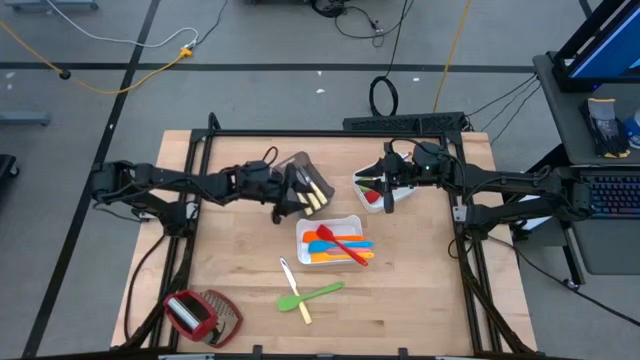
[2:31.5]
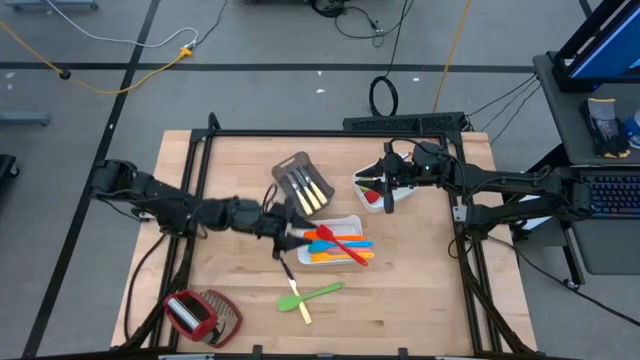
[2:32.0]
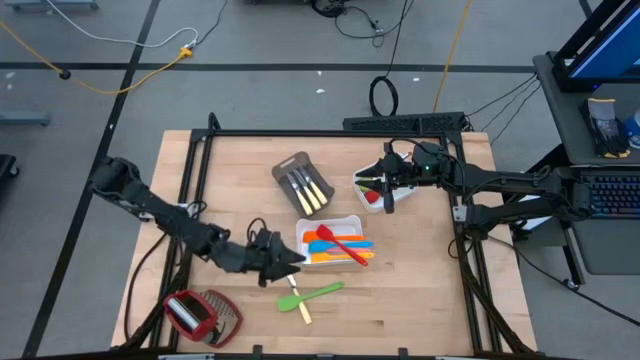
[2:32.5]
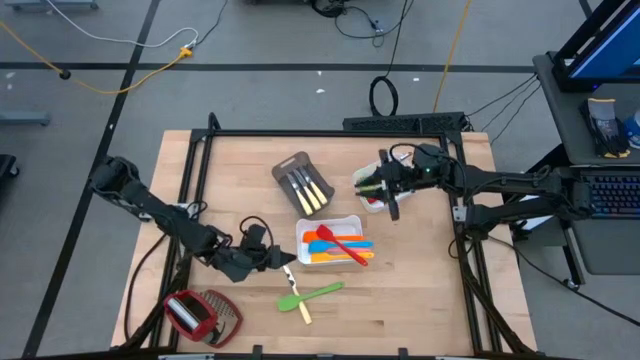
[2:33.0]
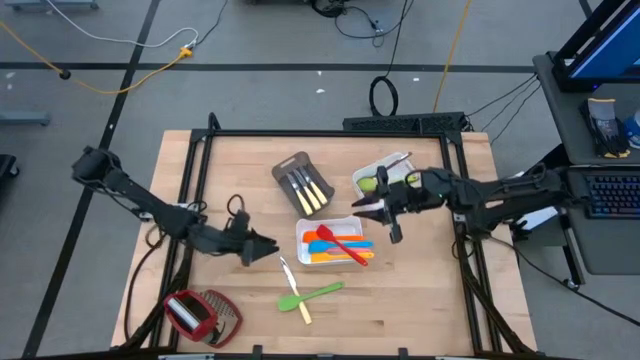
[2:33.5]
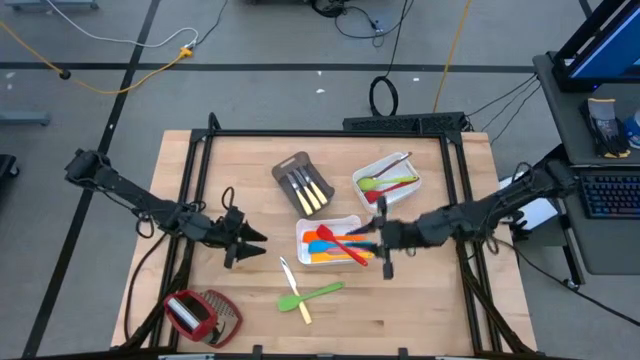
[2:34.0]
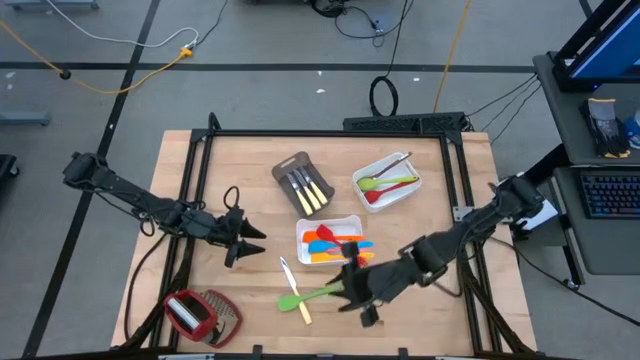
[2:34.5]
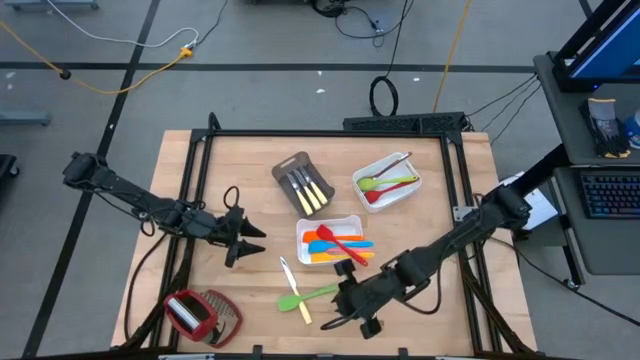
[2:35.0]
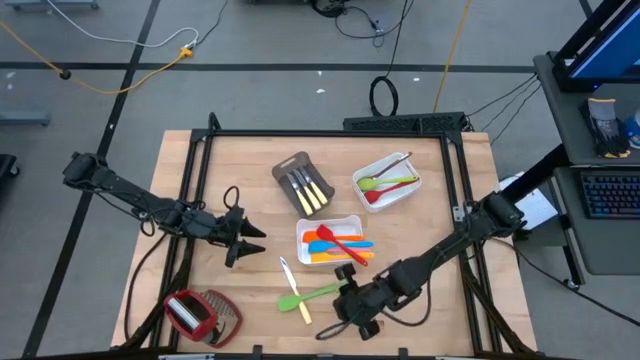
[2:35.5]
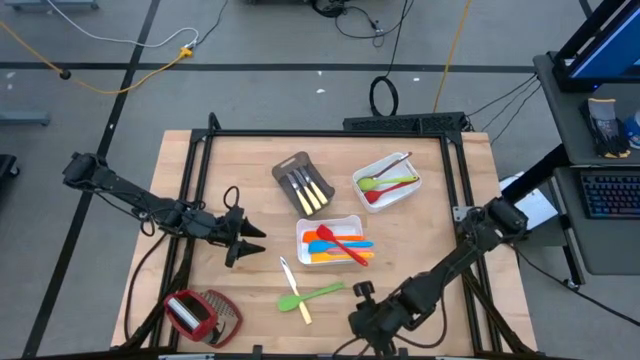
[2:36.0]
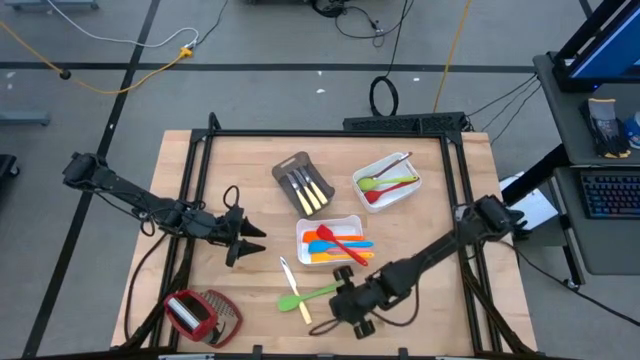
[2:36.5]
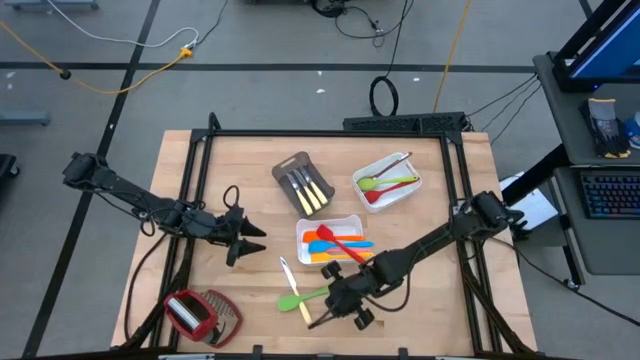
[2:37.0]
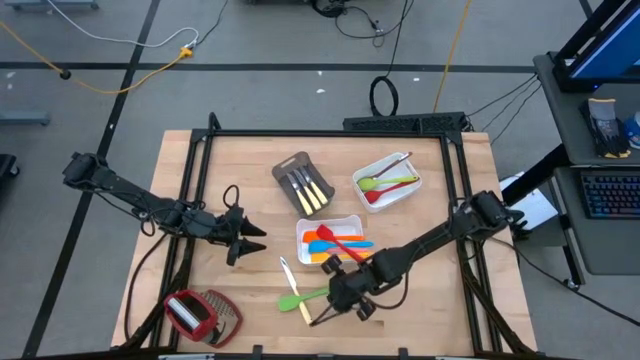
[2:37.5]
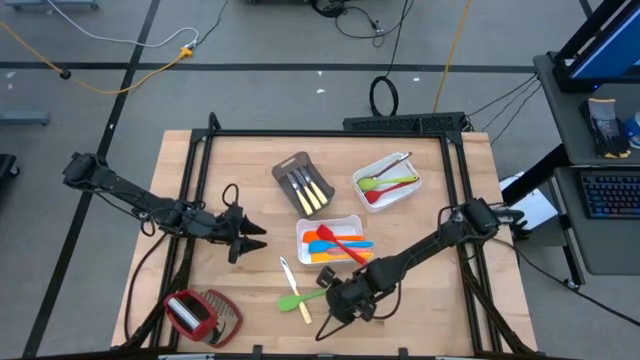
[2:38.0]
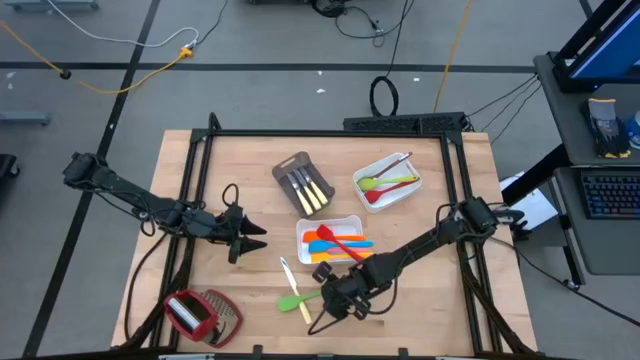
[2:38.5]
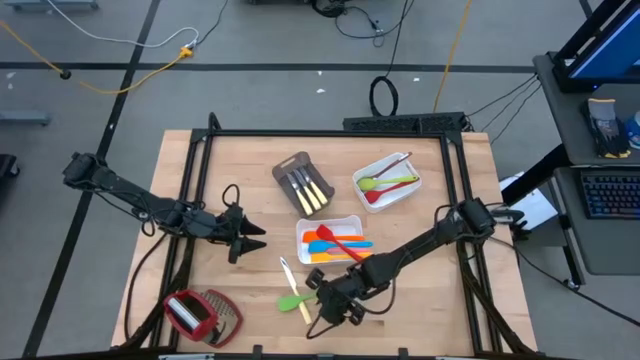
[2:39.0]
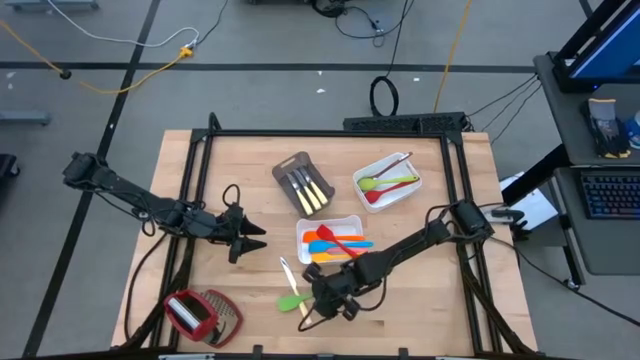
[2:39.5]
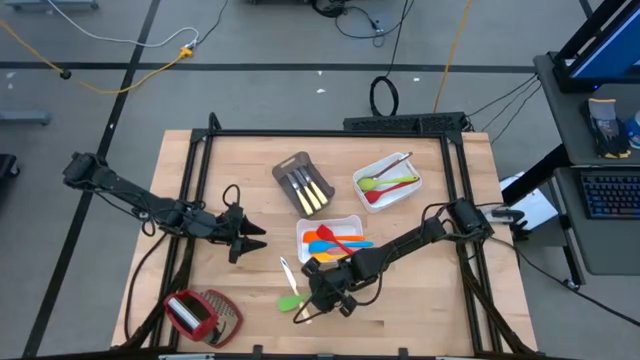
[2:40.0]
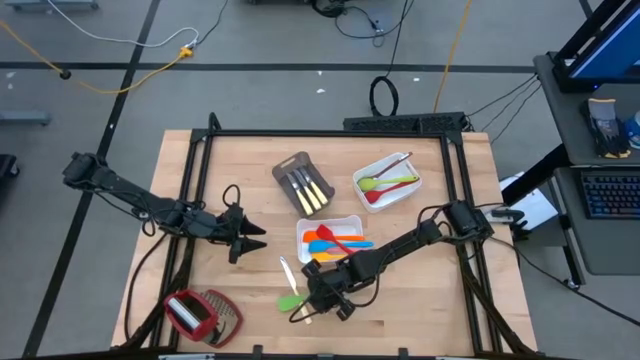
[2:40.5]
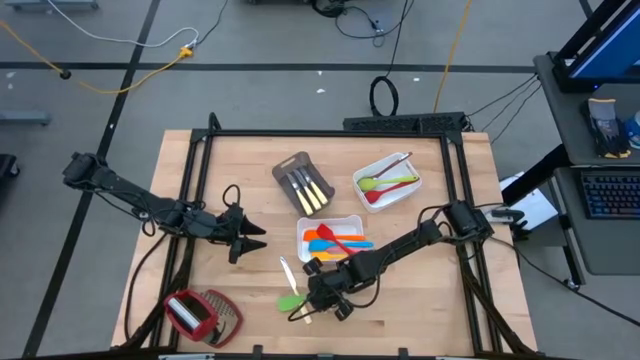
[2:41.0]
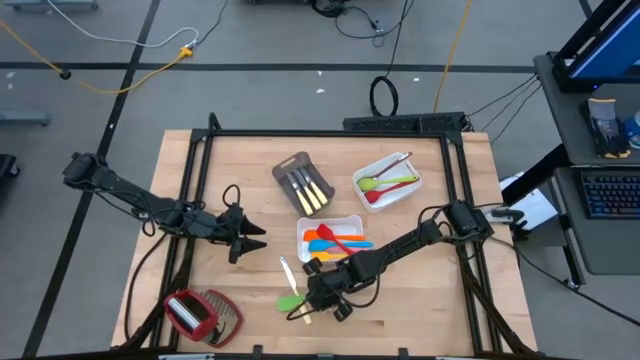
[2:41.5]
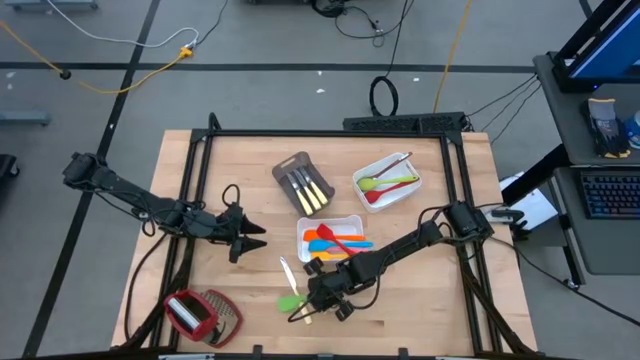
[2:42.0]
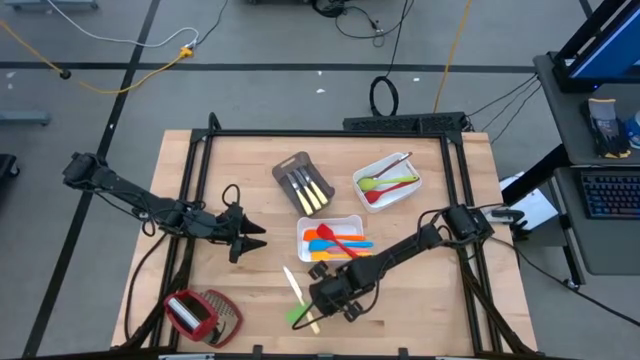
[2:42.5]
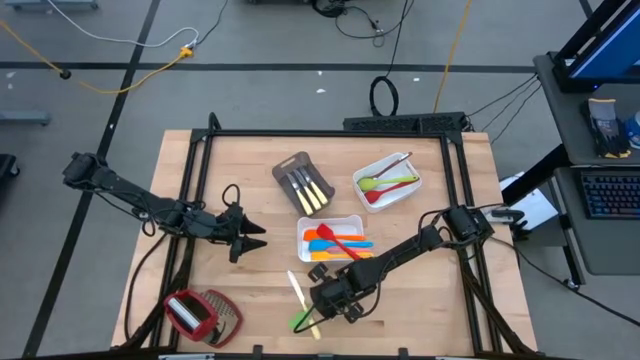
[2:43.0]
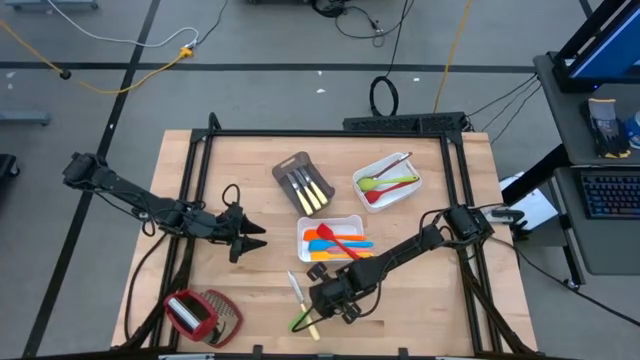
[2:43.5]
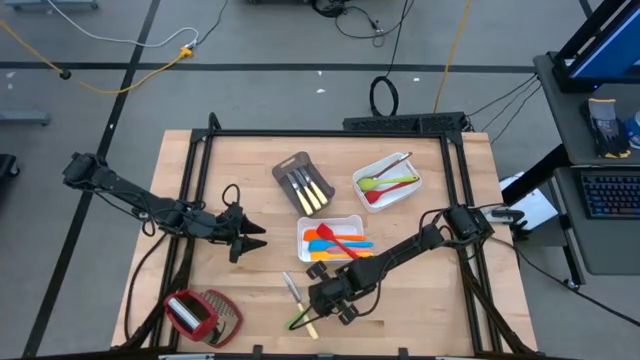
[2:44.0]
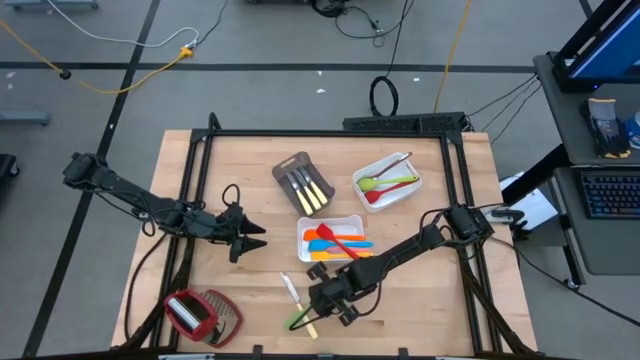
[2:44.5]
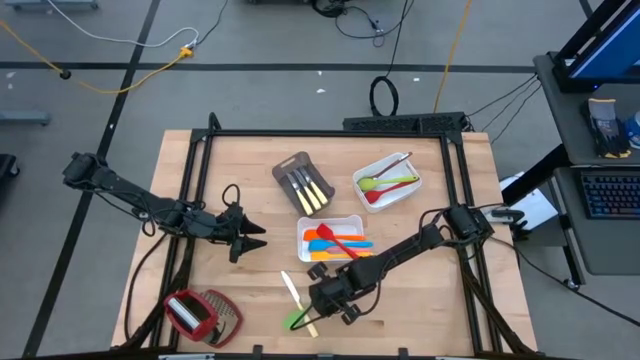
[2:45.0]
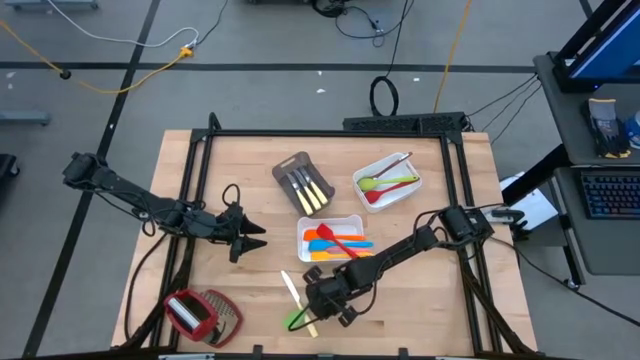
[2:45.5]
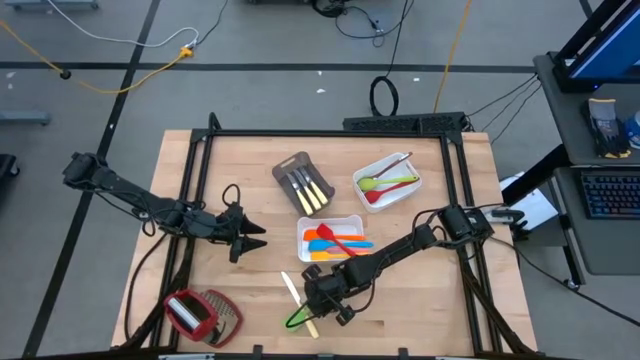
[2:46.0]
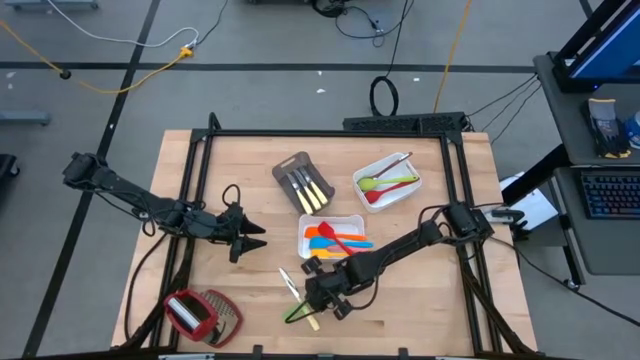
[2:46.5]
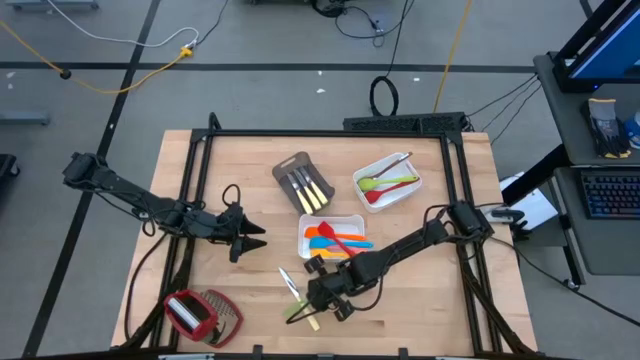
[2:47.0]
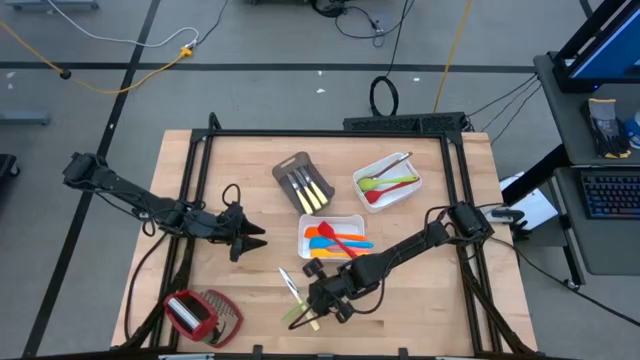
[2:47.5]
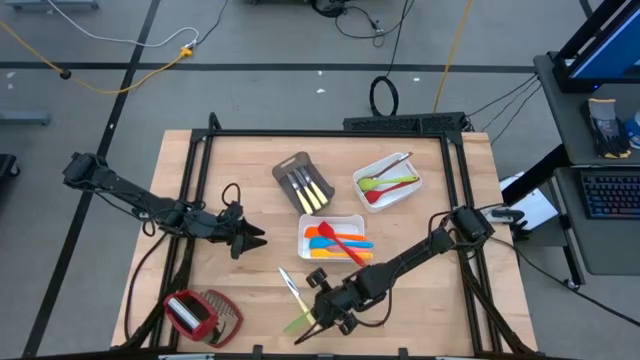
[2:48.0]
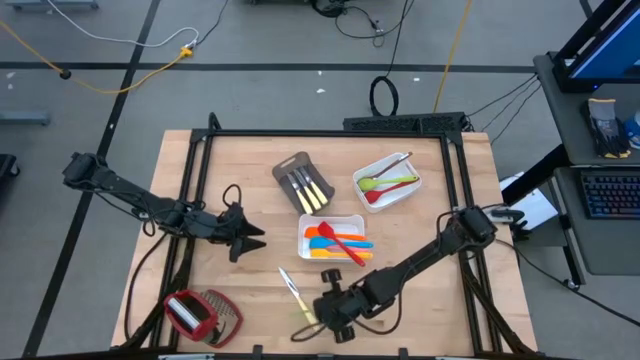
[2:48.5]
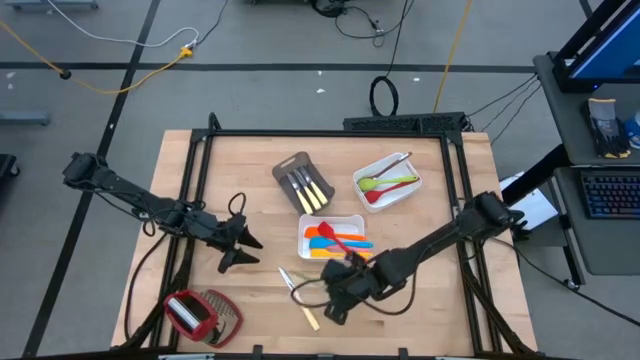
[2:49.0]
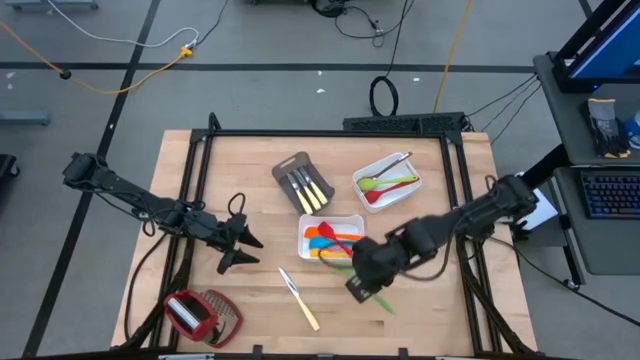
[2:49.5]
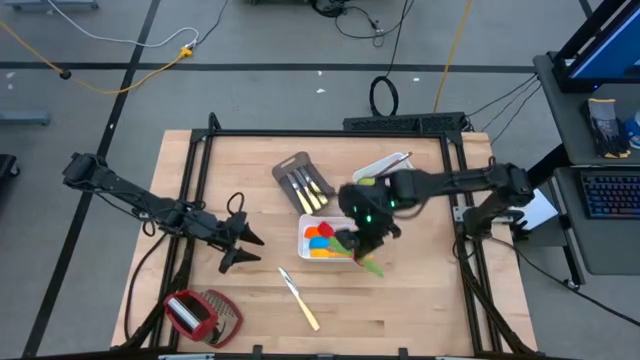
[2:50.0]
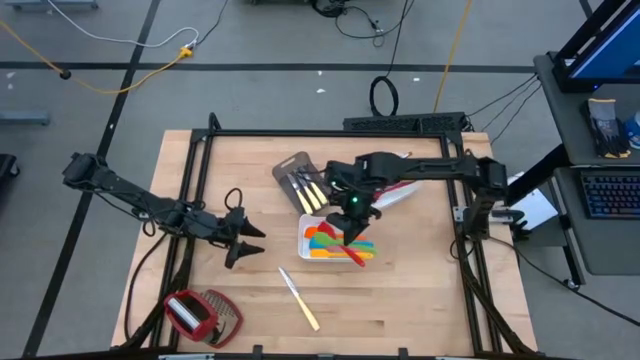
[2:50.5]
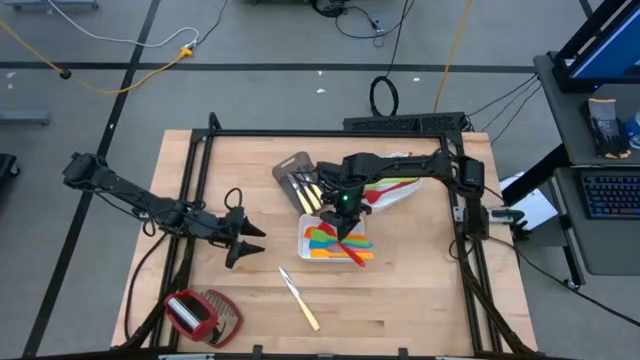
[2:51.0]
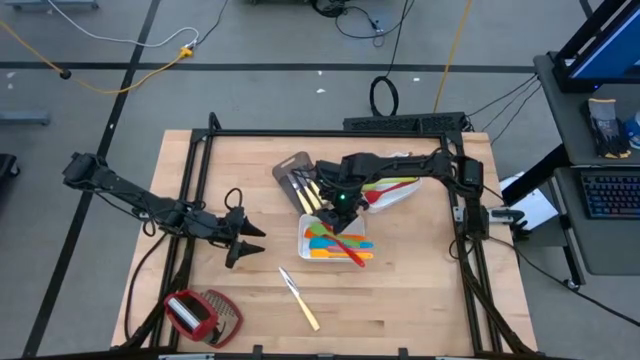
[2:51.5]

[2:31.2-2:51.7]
Task: Pick & Place Kitchen Items
Put the green spatula into bottom white bin

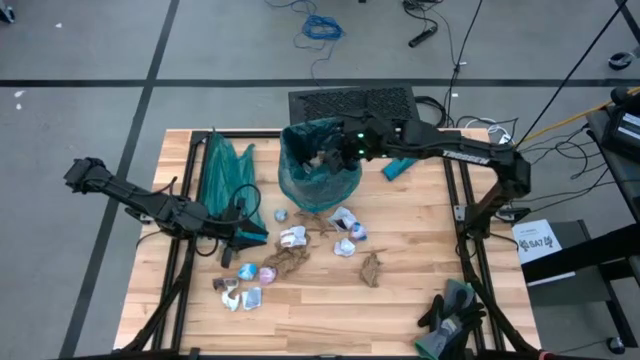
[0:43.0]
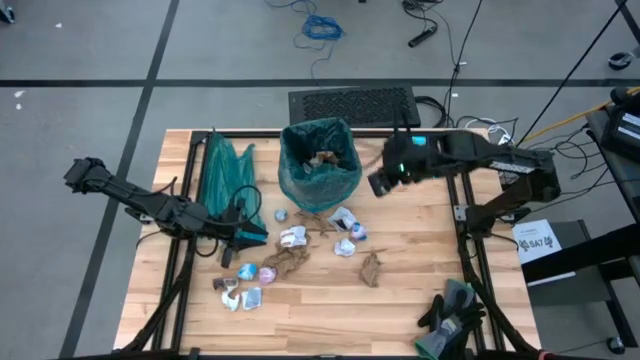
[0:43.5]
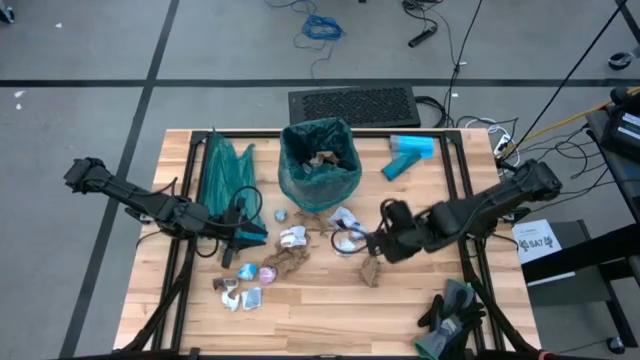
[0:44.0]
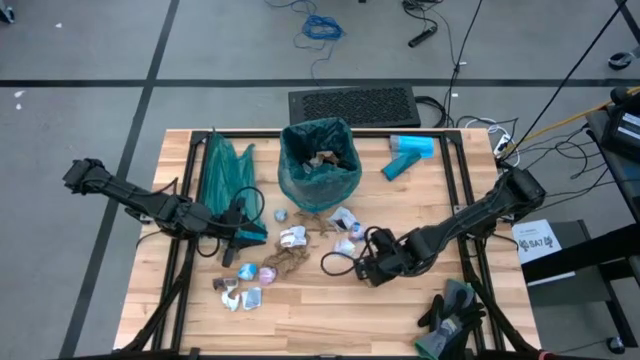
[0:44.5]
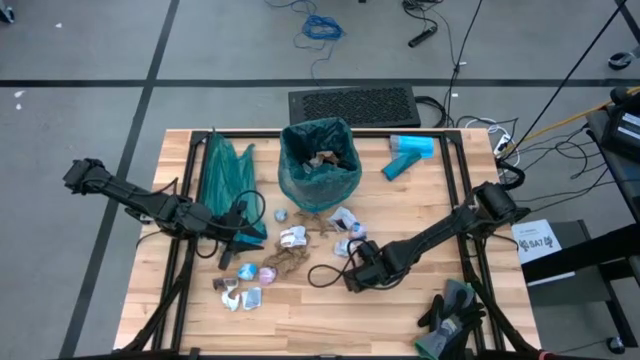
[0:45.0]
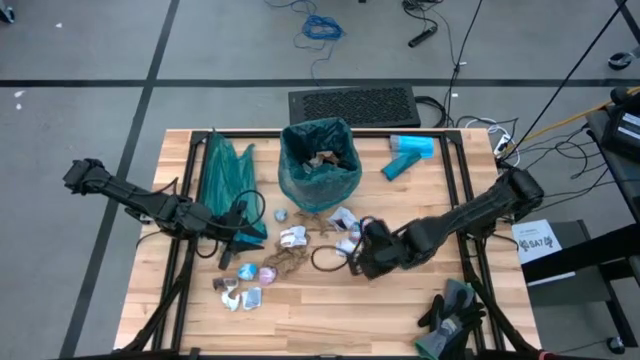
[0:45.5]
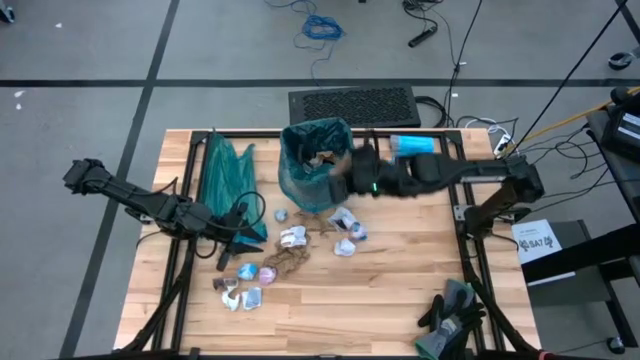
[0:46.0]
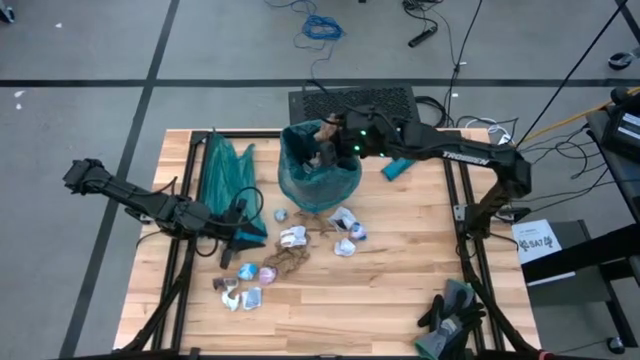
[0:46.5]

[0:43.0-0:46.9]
Task: place trash/remove bag and relplace
Put the brown napkin into the blue trash bag inside the black trash bin
